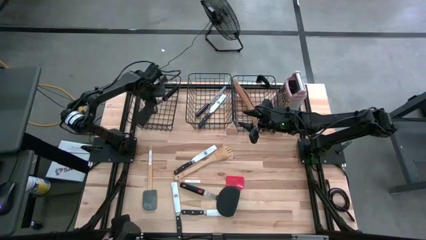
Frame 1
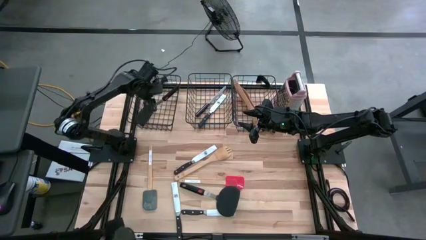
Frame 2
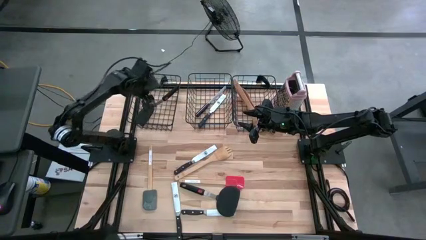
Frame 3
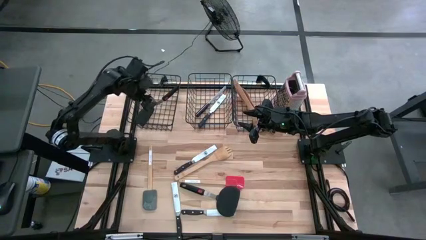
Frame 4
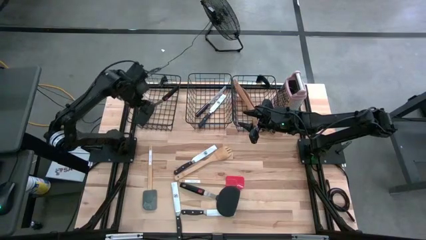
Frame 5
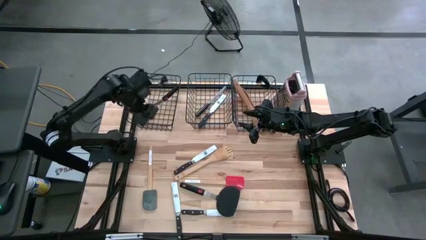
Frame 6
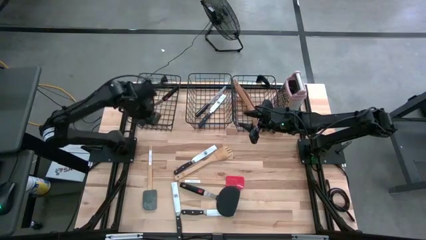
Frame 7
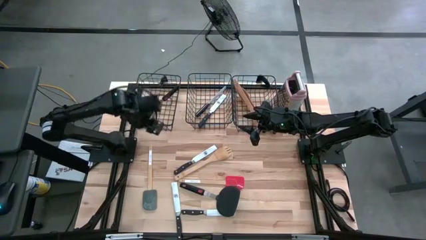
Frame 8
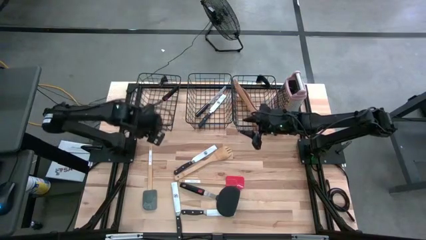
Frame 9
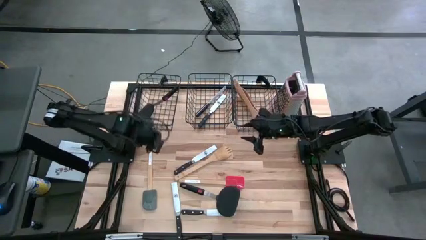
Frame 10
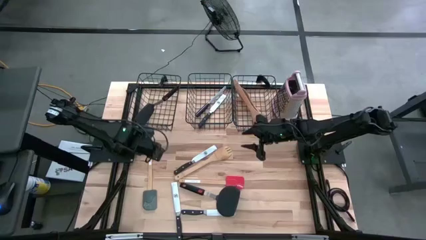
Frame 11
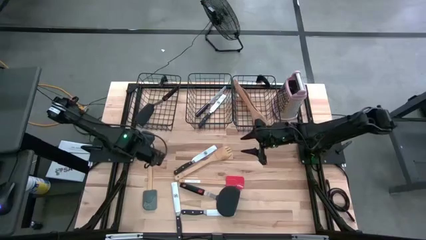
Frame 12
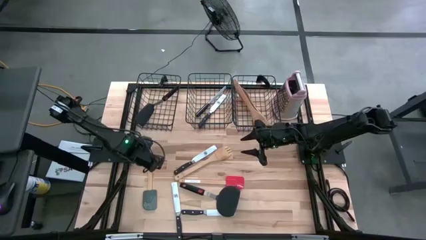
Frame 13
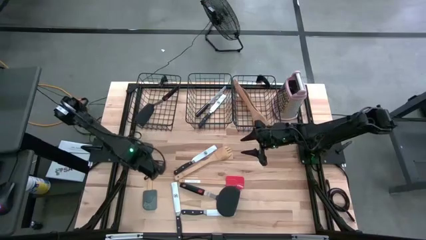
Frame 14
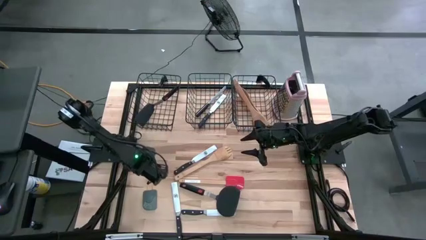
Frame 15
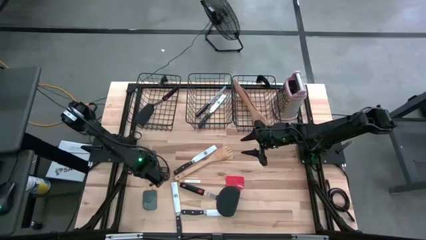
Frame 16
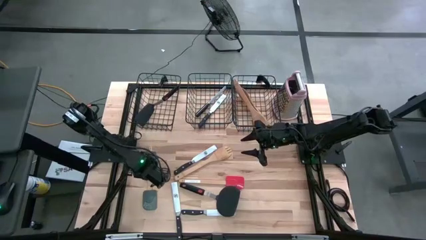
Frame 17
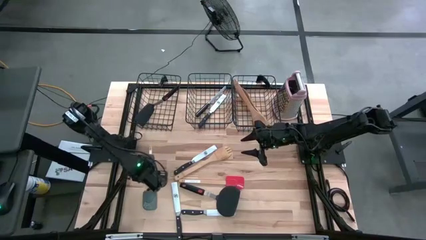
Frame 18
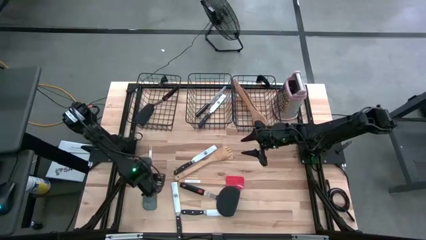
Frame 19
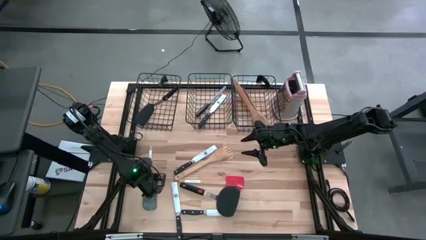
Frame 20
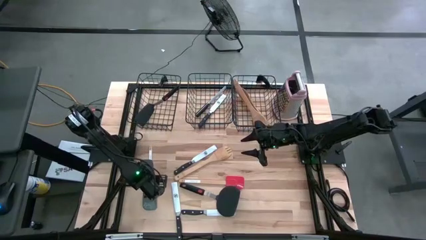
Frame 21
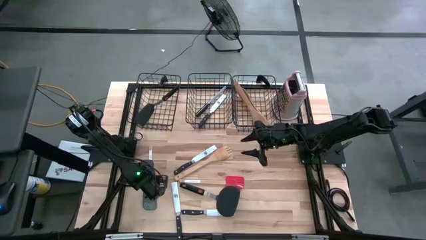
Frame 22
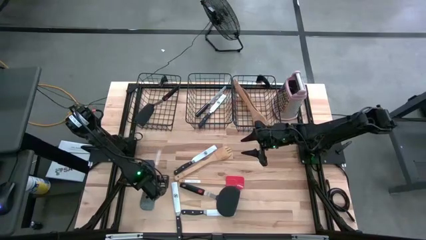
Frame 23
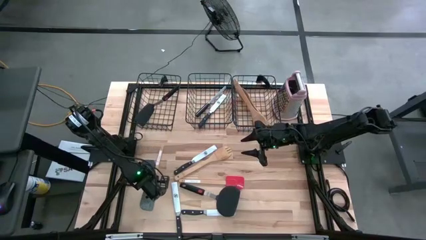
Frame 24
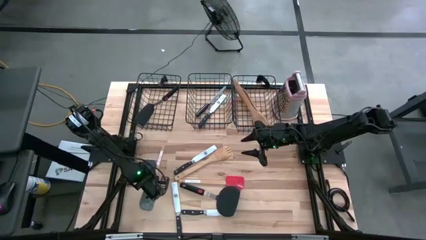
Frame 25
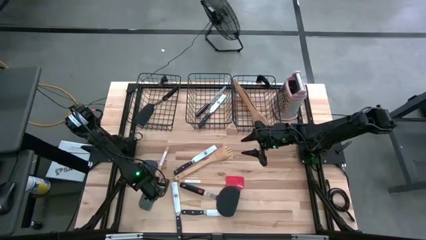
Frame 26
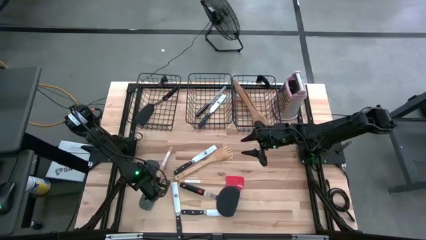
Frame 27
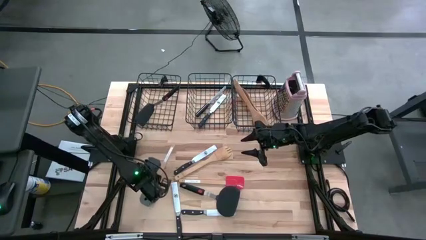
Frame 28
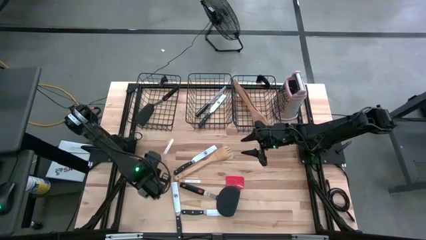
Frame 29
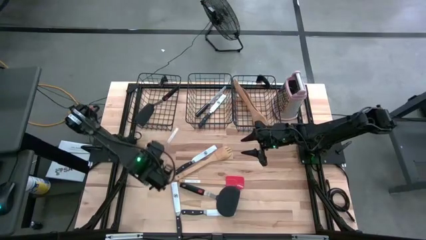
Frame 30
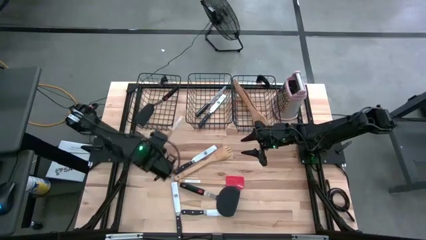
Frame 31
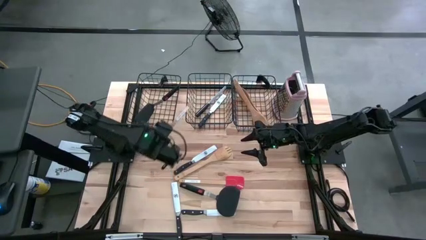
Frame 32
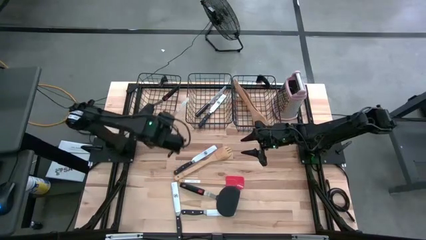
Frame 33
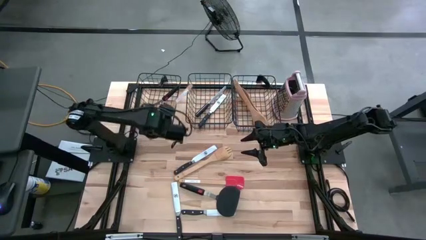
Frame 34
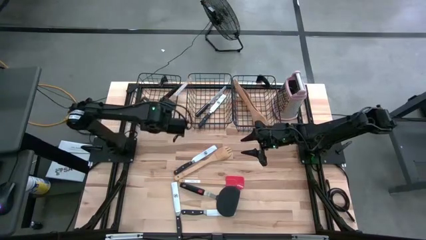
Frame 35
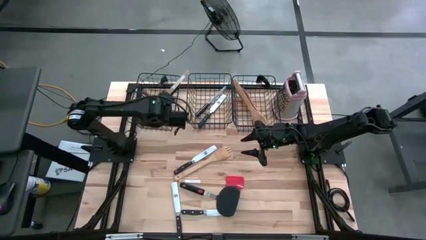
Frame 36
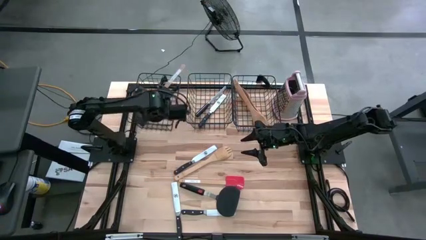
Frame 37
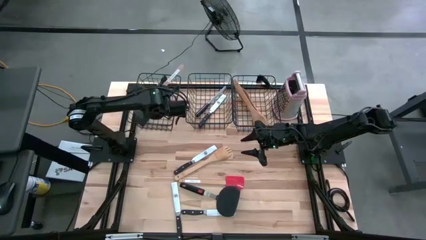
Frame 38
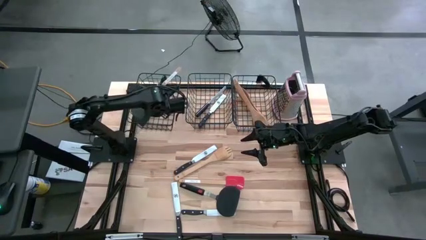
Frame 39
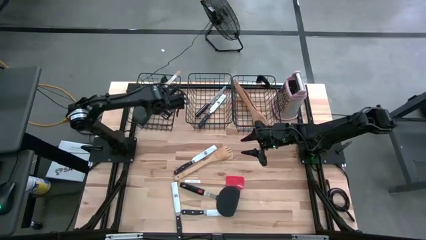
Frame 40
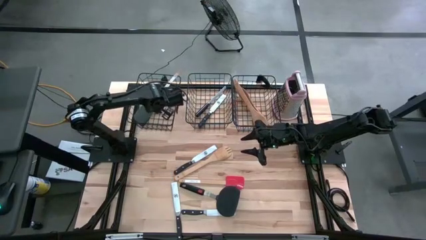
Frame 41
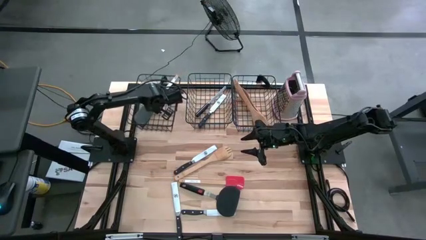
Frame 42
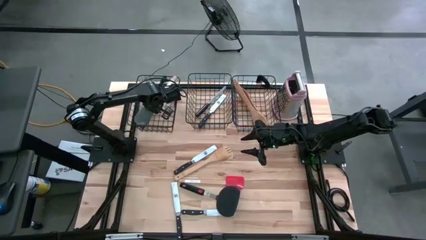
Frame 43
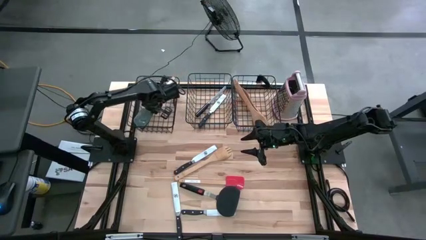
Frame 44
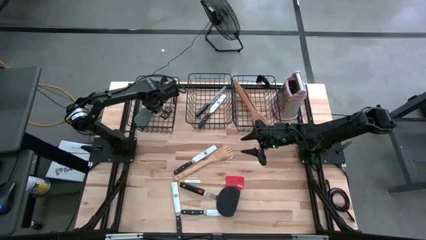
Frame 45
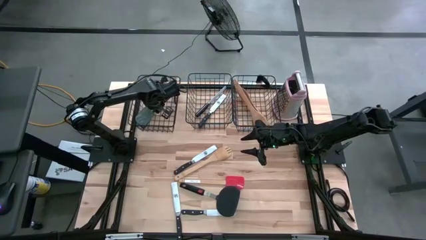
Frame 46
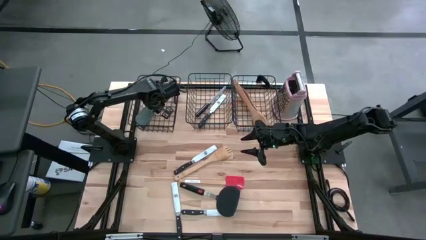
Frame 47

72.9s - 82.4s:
Task: Pick & Place Kitchen Items
Put the gray spatula into the left black wire basket

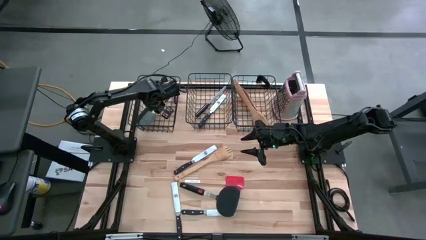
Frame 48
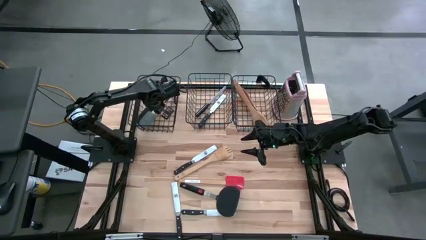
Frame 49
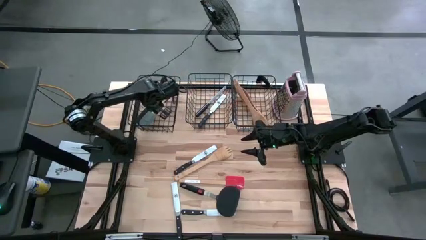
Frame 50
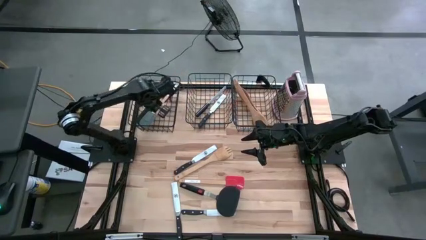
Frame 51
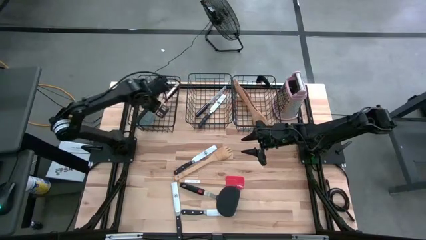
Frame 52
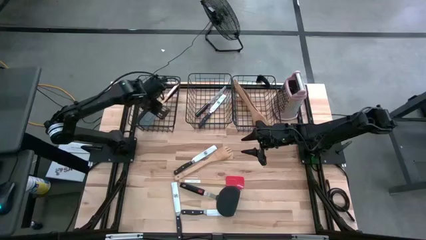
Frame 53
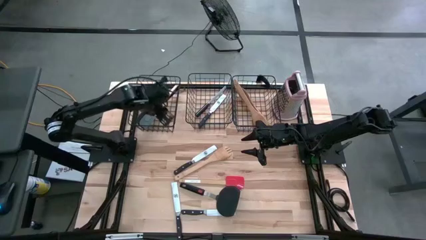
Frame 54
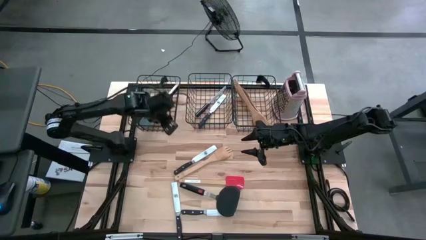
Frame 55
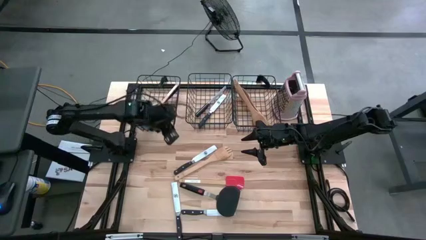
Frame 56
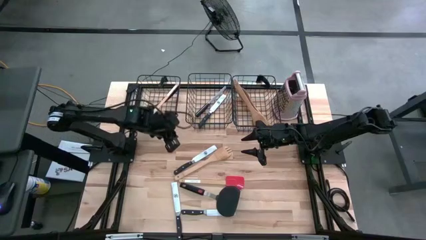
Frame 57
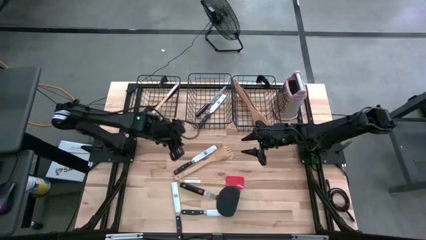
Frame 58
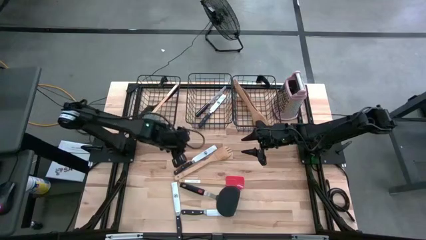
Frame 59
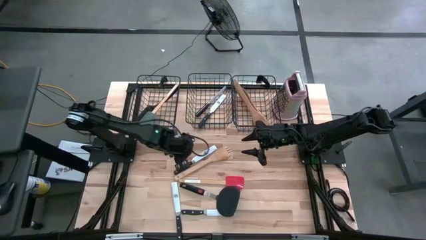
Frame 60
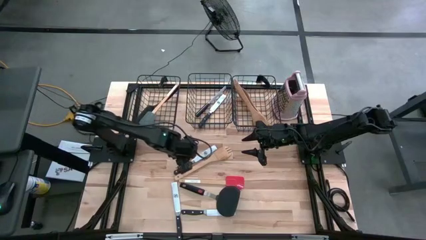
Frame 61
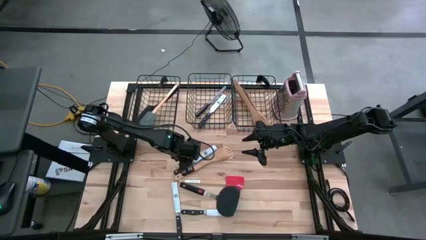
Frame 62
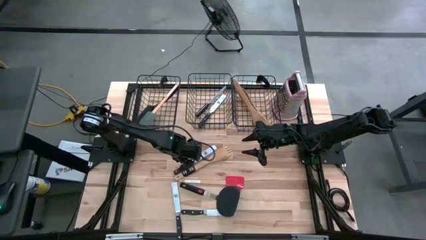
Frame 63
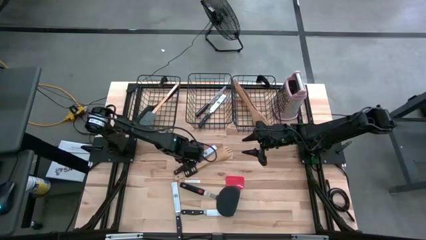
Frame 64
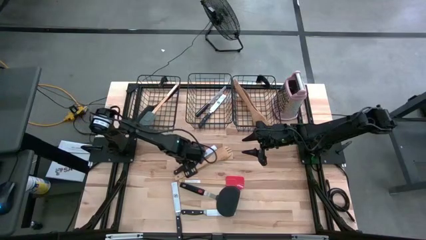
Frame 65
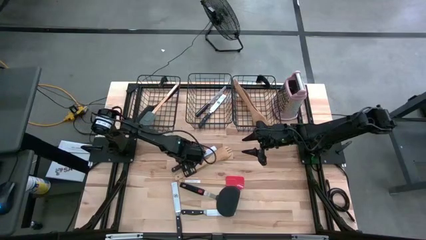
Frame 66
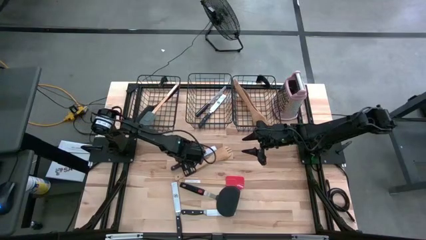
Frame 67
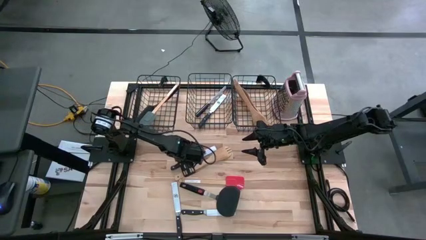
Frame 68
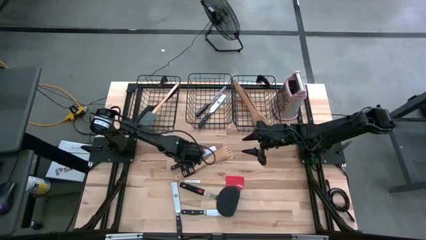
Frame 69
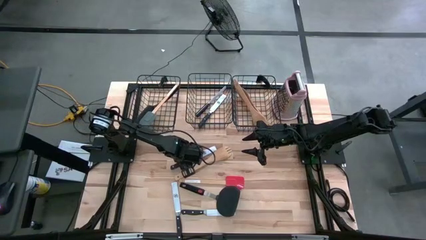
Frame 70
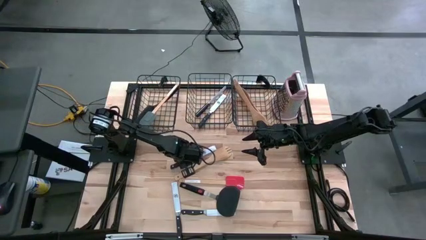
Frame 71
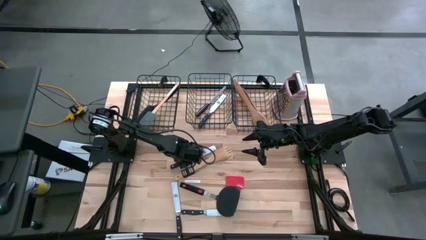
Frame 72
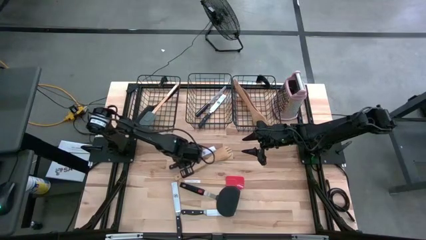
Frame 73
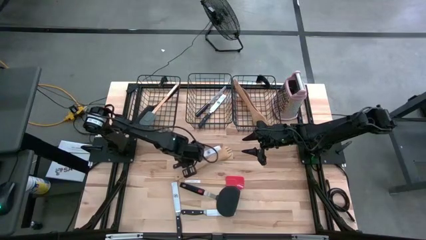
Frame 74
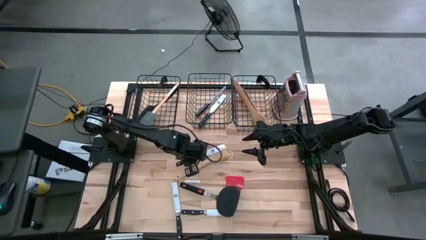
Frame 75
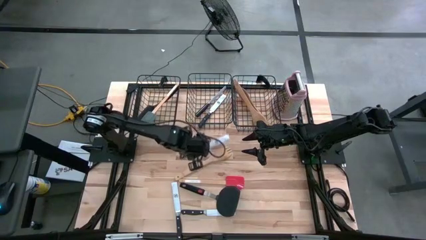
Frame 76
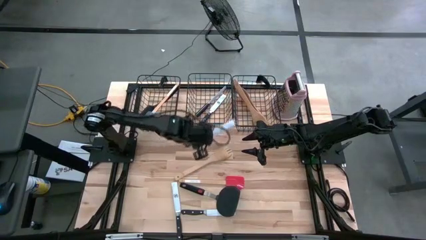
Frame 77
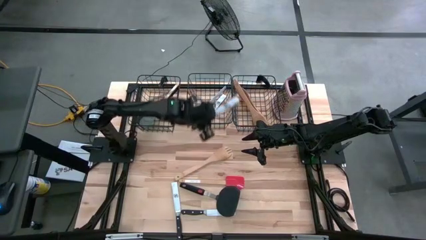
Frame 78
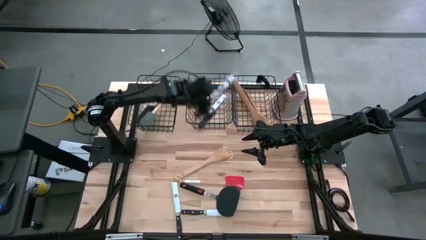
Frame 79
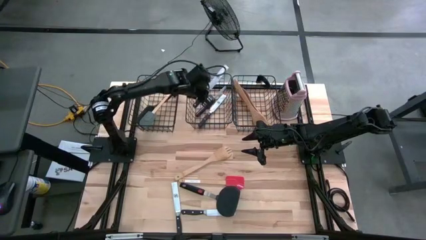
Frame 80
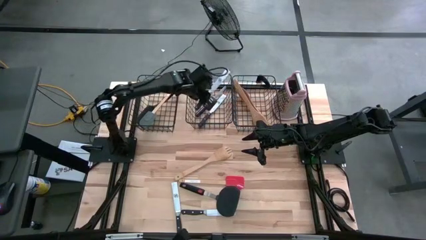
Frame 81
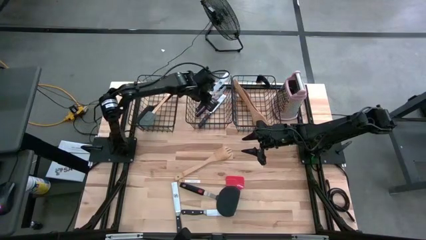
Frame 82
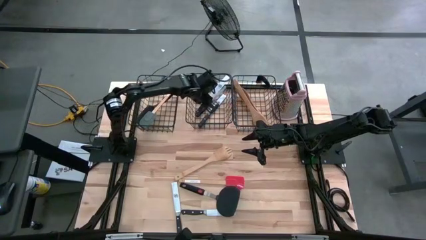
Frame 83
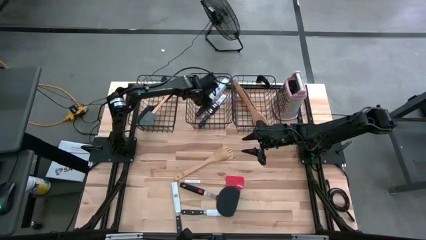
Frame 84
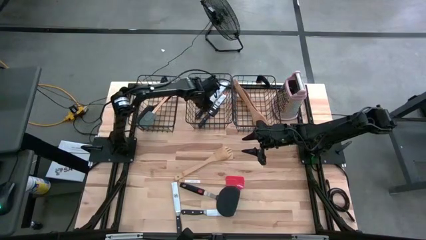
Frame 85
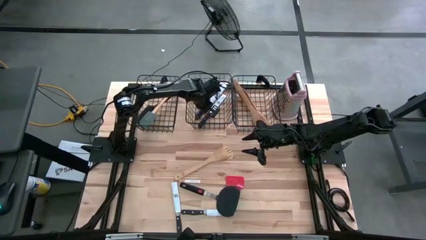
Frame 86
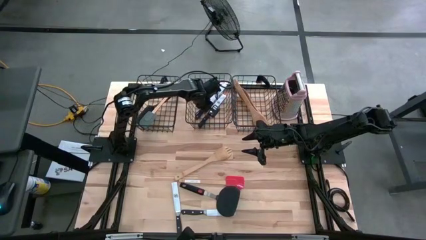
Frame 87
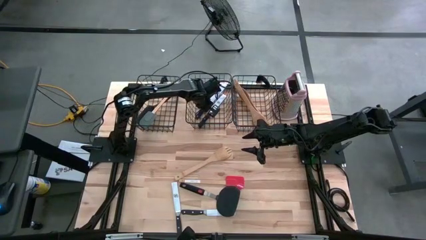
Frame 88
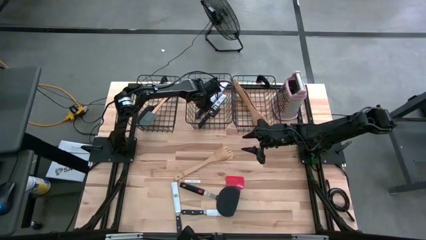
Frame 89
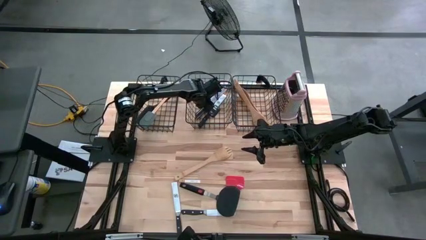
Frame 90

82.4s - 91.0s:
Put the black knife into the middle black wire basket
